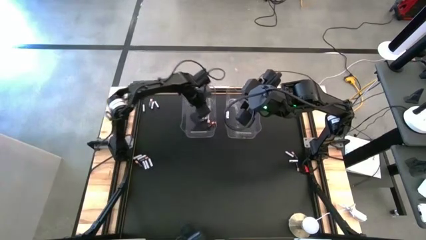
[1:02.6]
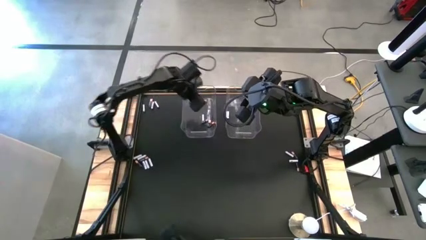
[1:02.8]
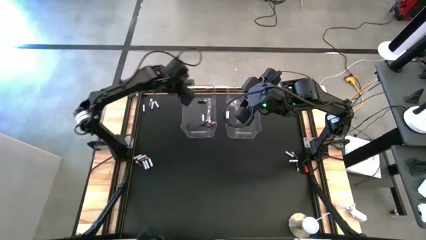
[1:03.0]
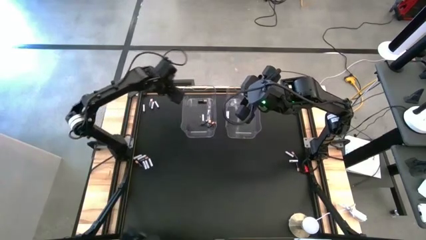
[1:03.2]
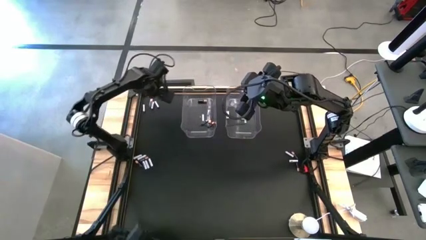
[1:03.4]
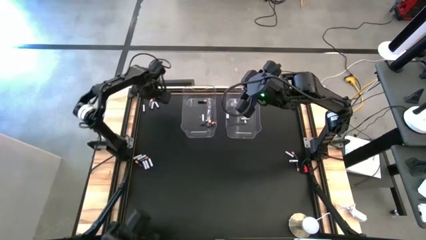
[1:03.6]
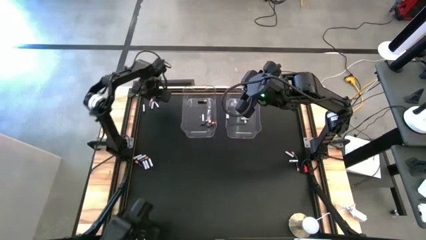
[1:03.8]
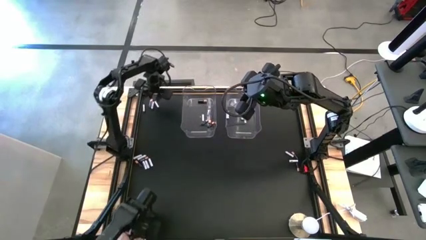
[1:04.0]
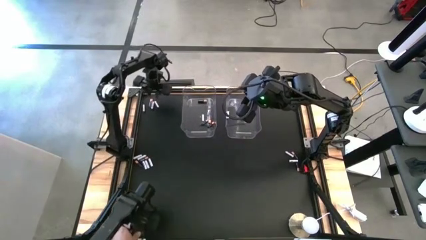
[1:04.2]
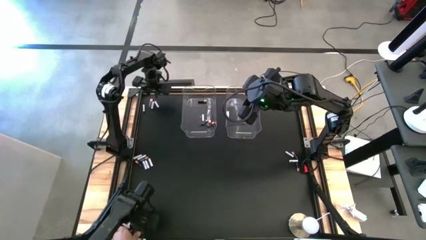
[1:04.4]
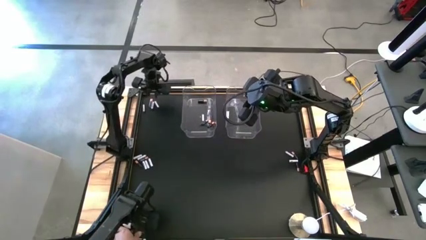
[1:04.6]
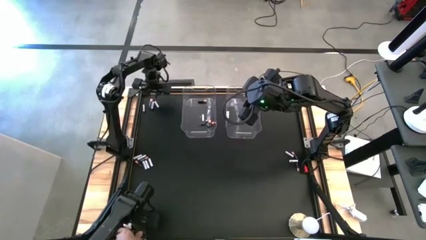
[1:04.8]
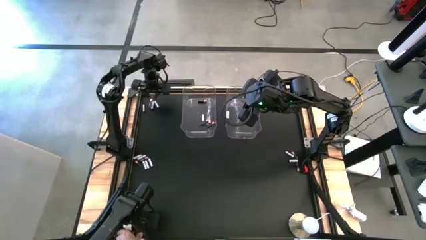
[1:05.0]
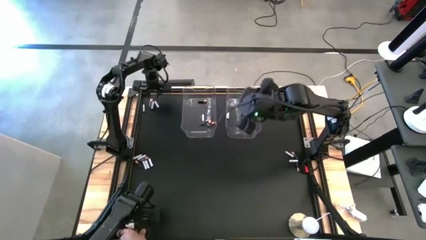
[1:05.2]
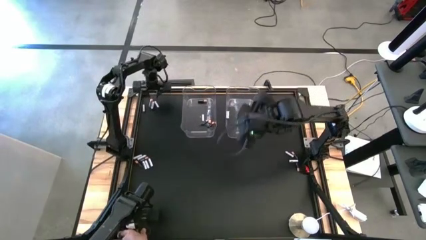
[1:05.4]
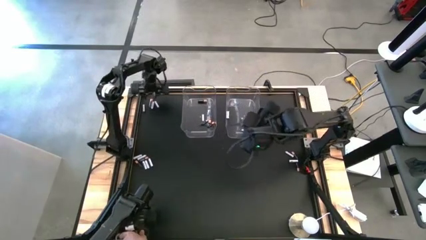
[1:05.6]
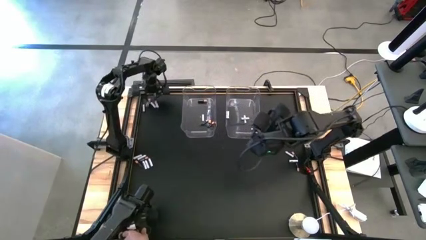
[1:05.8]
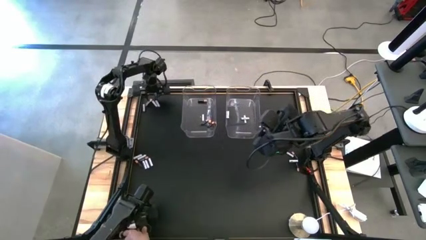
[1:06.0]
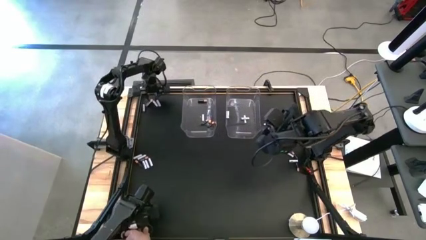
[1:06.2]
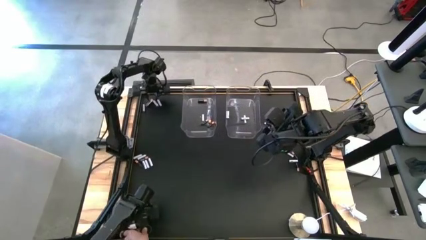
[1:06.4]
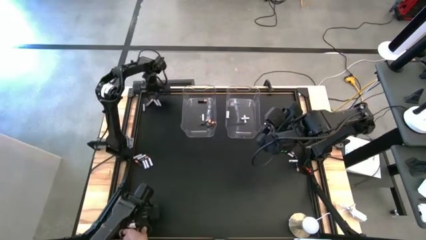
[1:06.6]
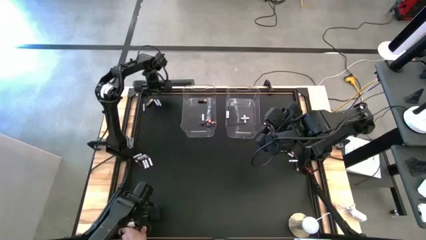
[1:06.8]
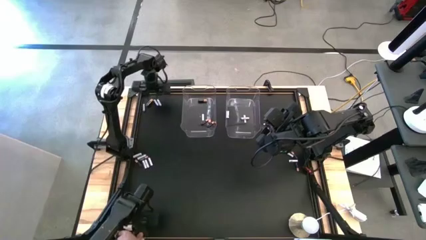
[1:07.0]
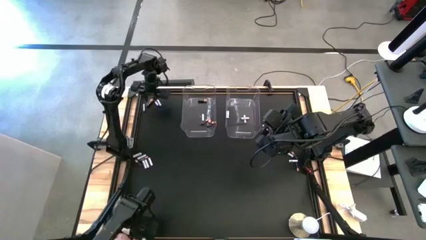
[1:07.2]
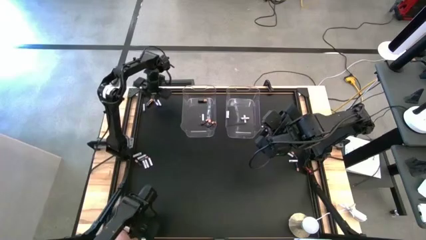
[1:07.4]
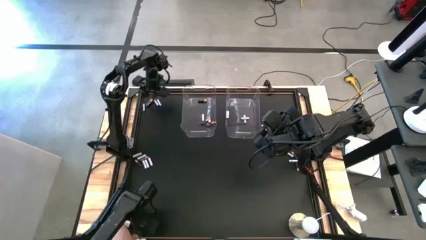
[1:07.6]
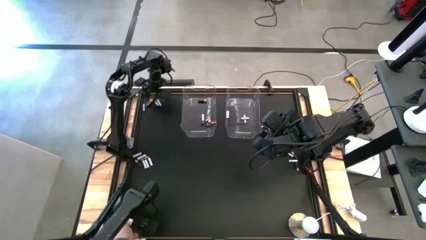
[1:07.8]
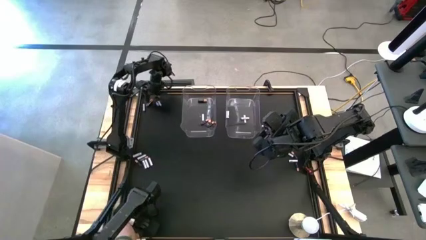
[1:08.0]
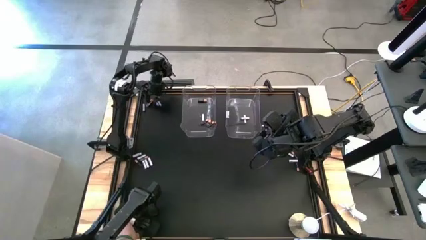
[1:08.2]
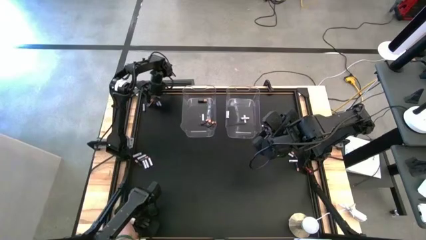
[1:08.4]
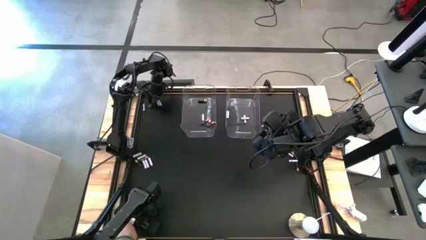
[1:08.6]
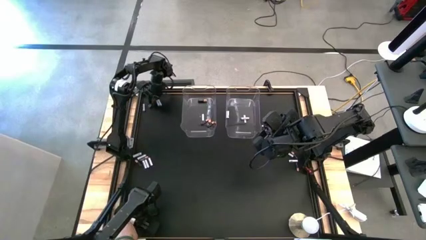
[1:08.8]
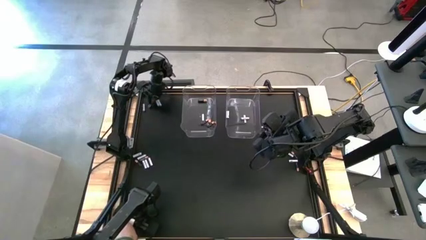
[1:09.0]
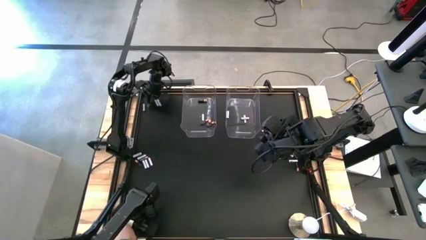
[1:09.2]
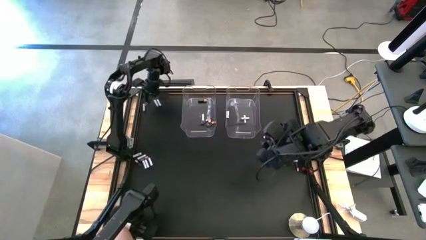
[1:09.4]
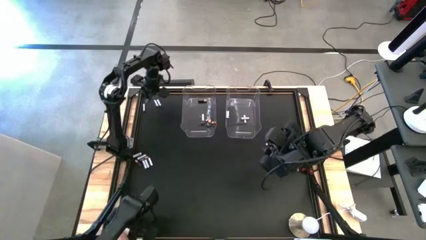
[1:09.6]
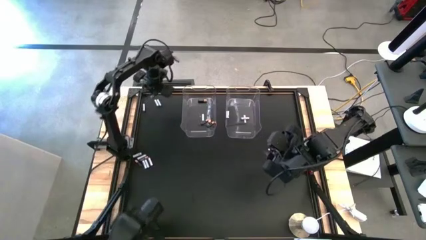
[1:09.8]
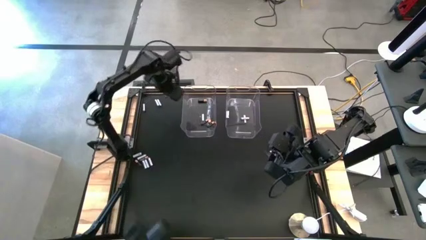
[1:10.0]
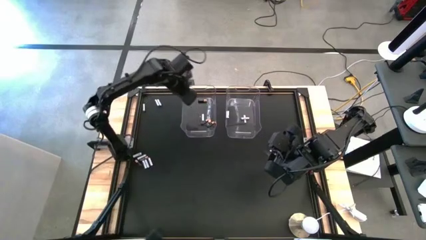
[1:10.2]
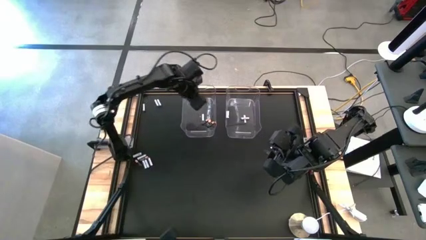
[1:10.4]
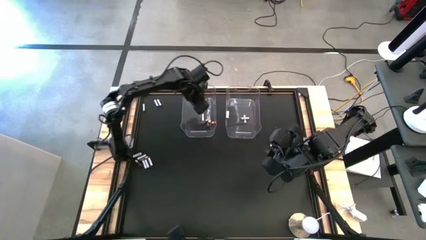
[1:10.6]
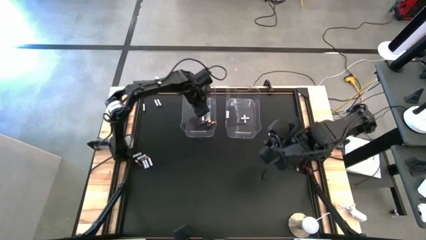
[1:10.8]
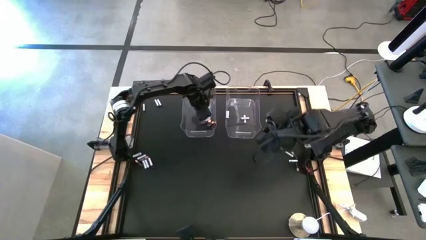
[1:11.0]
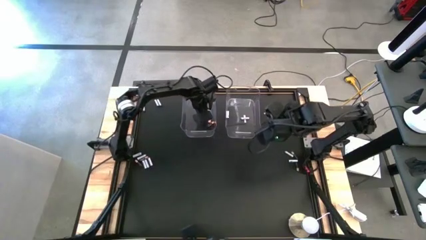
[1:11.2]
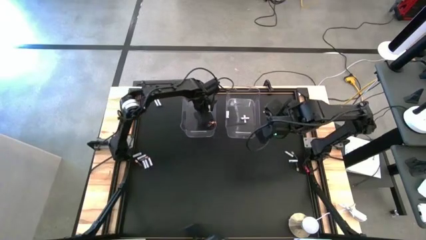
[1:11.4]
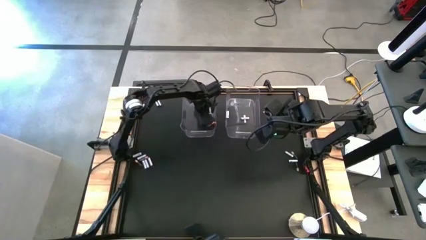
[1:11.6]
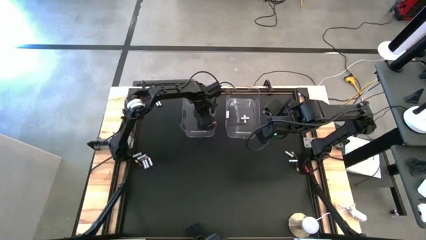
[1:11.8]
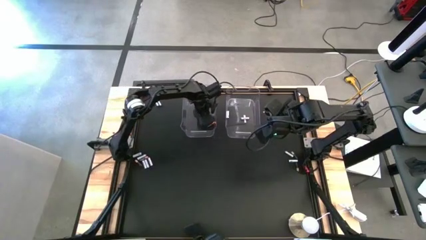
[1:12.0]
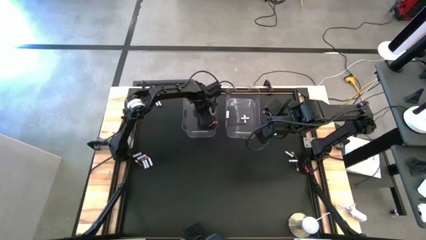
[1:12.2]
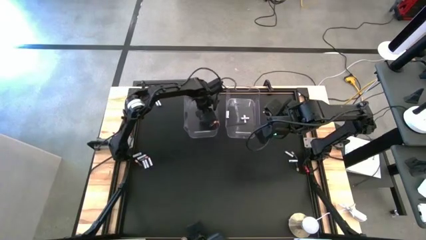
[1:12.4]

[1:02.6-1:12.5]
Task: Sort batteries
Put the black battery into the left transparent bin

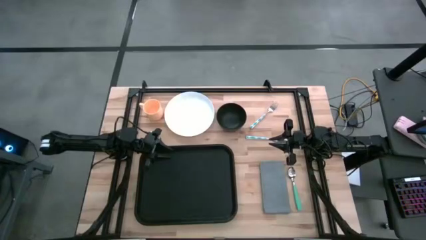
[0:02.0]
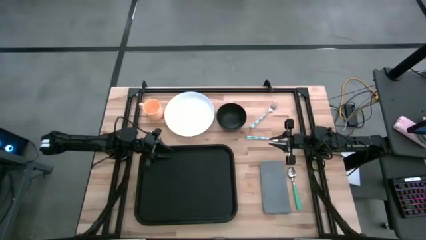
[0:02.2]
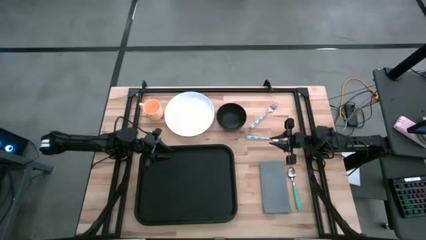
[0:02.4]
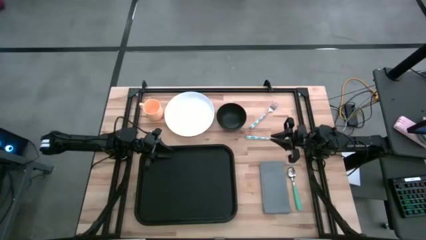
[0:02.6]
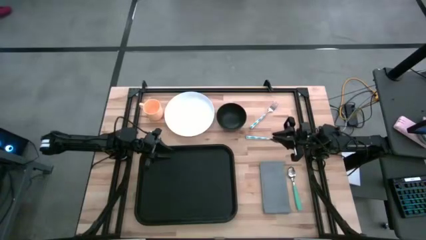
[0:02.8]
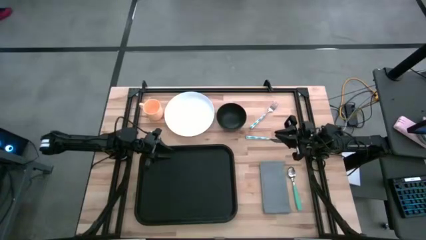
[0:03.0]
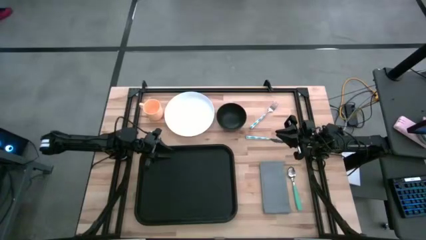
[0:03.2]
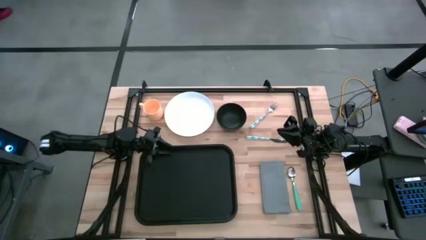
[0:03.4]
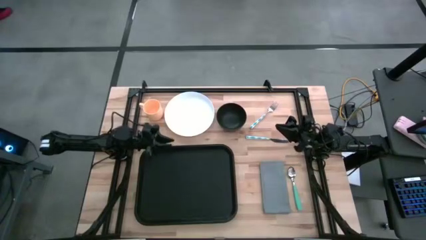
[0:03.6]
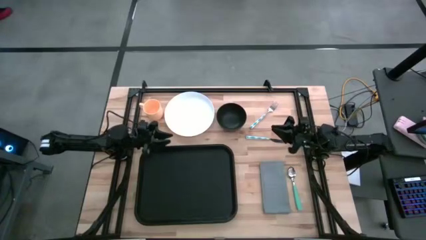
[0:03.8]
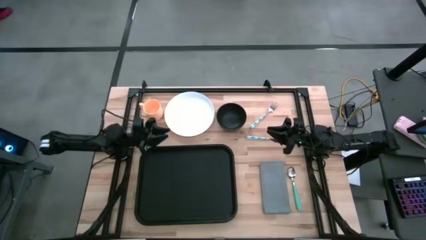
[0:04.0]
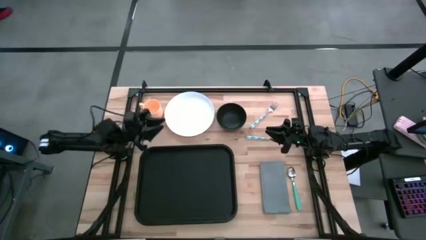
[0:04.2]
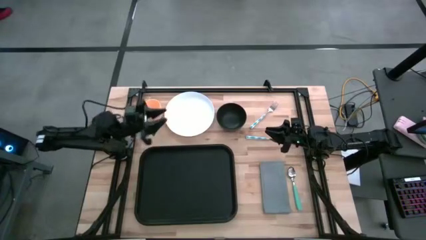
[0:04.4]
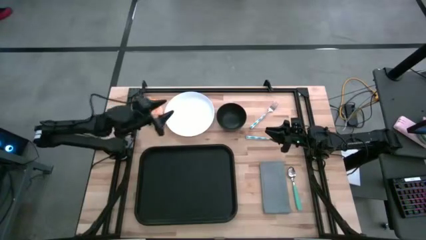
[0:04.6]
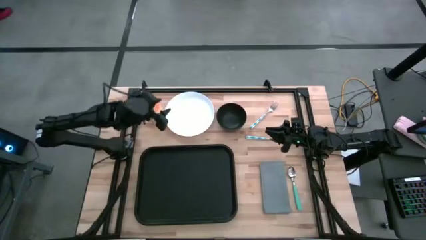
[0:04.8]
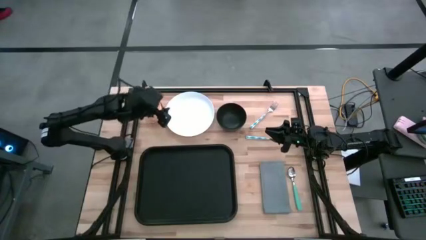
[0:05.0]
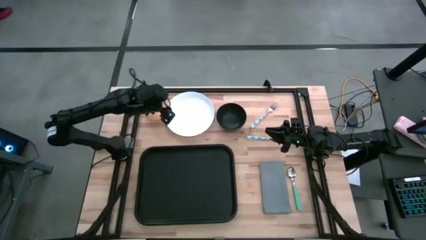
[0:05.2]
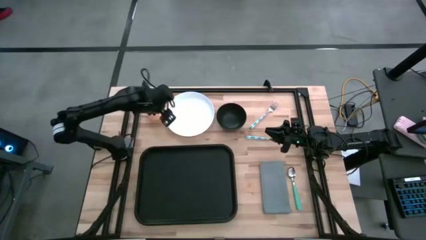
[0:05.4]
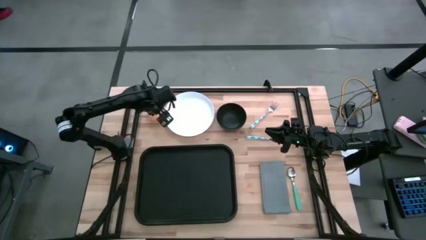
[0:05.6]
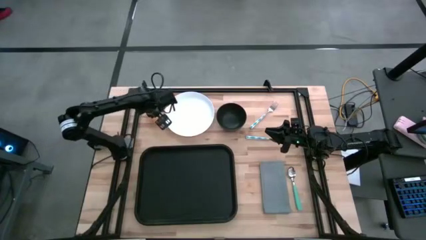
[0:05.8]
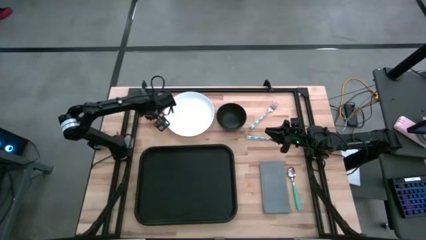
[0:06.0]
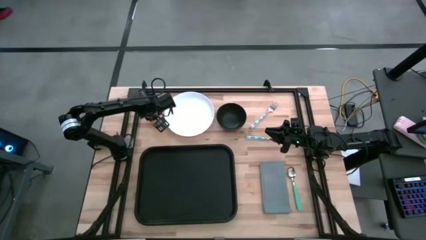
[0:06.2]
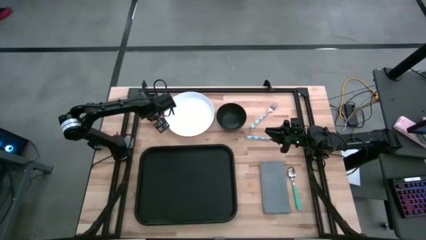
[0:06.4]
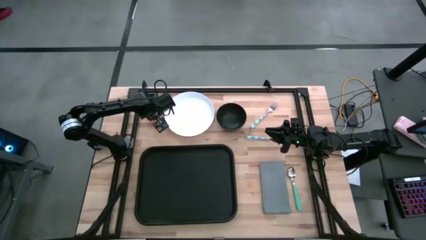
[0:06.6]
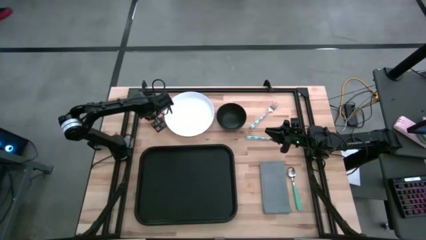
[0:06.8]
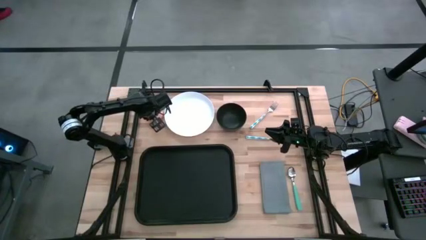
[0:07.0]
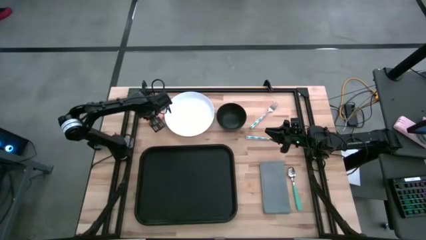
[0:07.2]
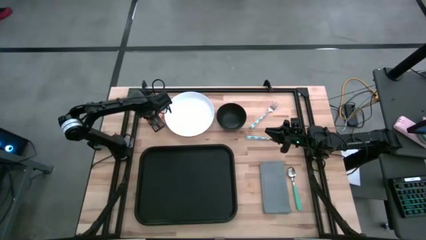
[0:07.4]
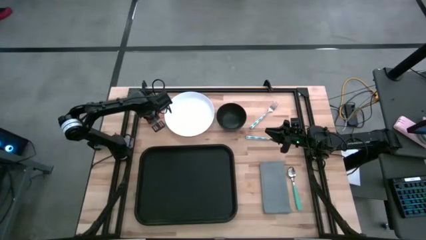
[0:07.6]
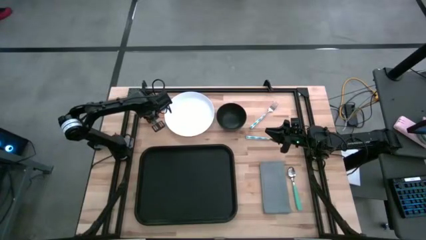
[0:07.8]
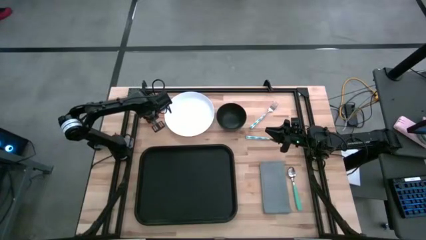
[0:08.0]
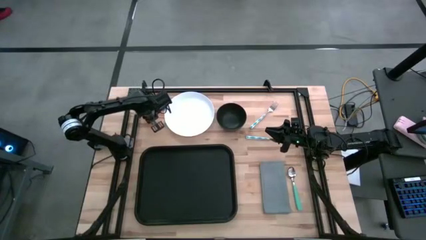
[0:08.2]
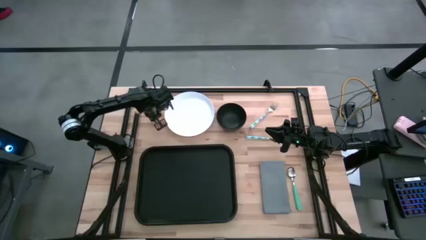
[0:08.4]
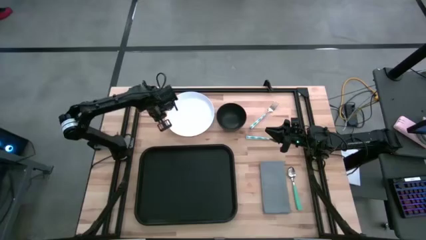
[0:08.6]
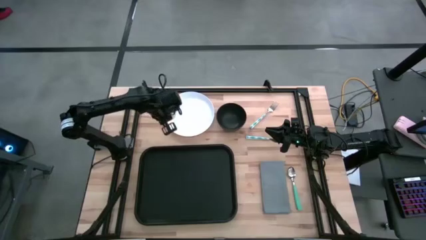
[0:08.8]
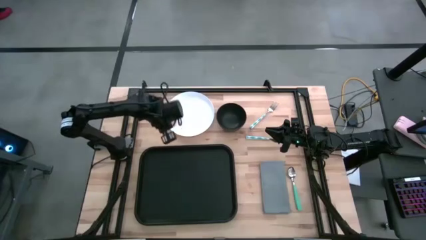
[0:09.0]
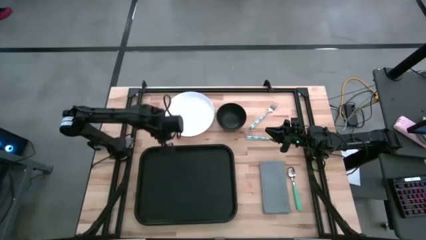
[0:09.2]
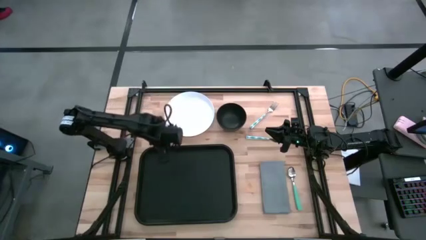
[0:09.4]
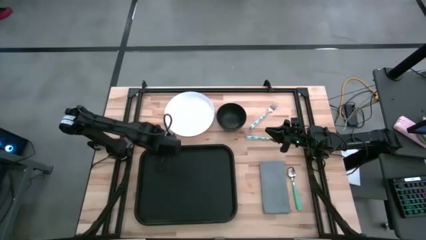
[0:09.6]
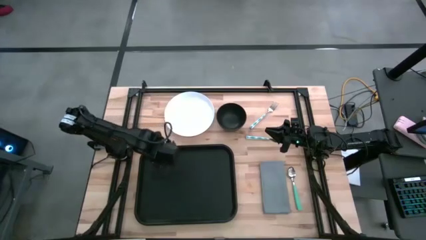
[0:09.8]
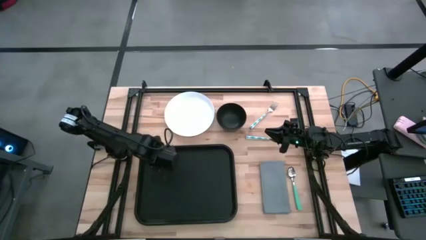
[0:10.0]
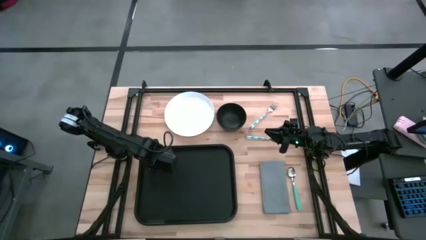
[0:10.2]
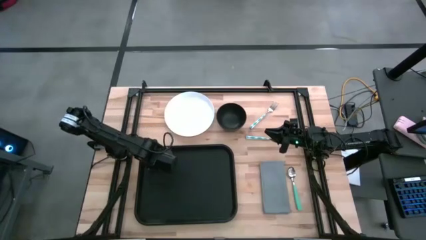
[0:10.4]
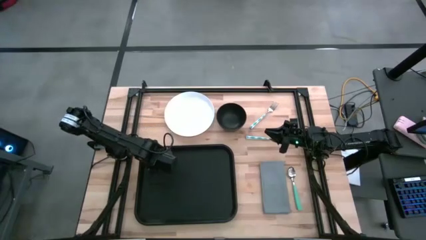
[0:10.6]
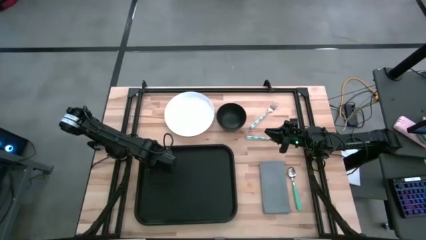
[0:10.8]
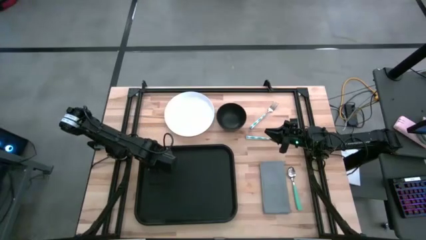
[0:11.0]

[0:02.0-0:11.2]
Task: Set up tray
Put the orange cup on the top left of the black serving tray
